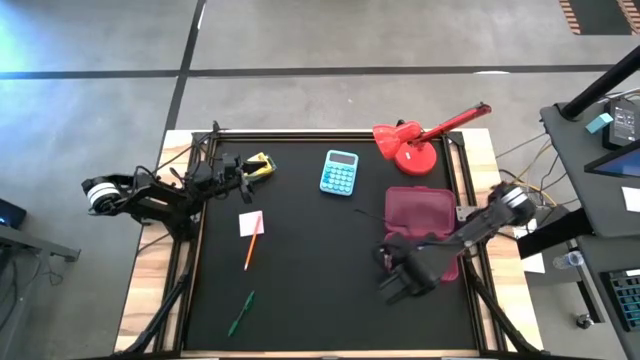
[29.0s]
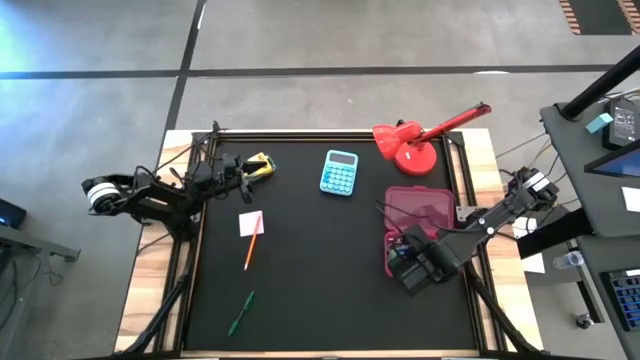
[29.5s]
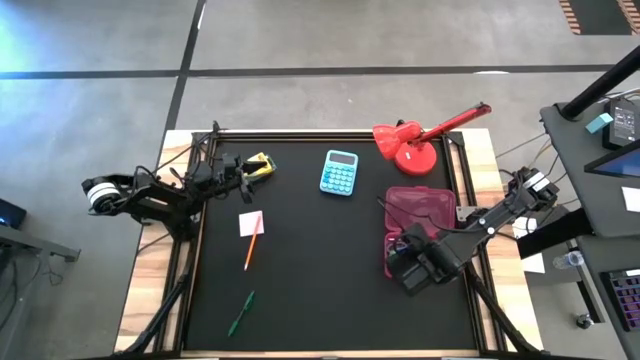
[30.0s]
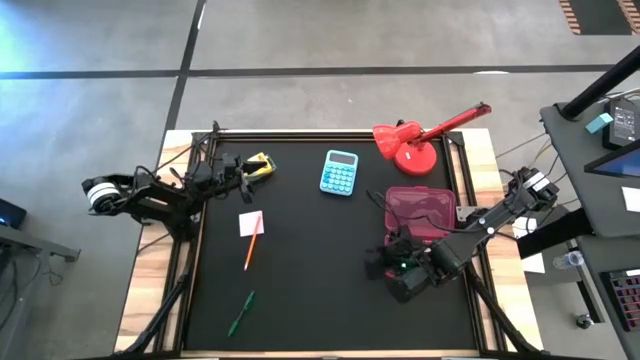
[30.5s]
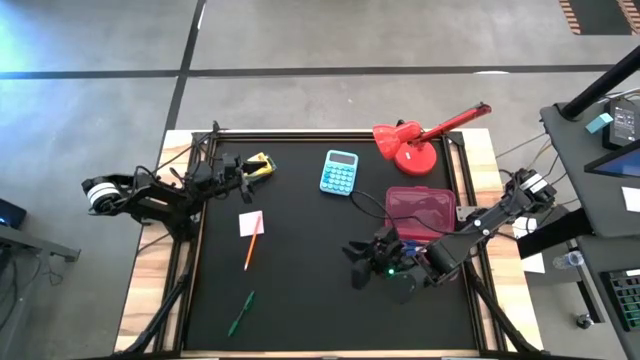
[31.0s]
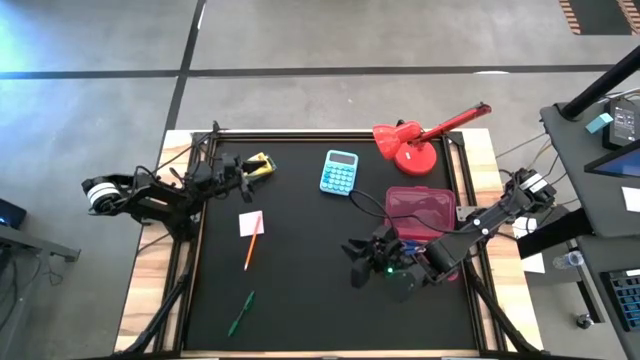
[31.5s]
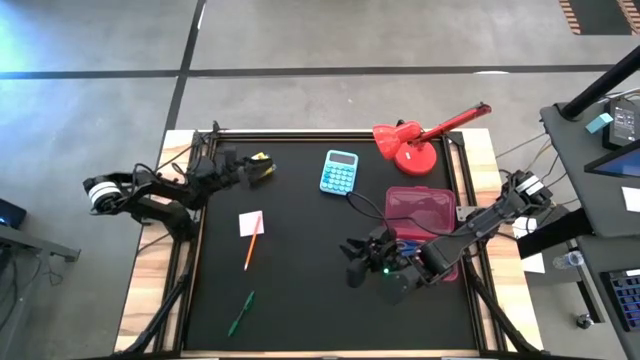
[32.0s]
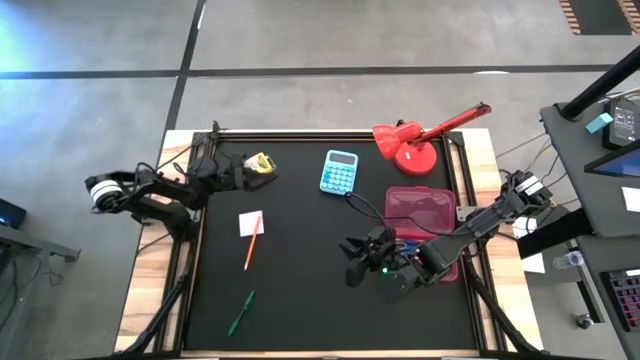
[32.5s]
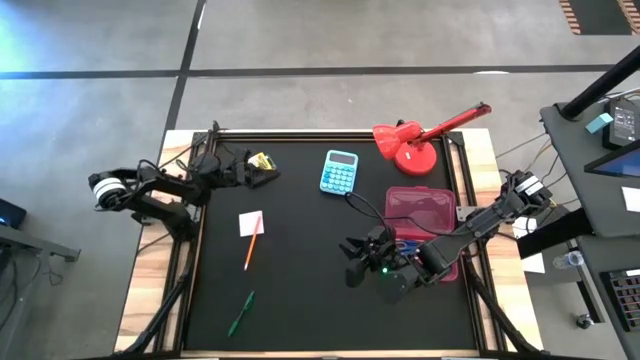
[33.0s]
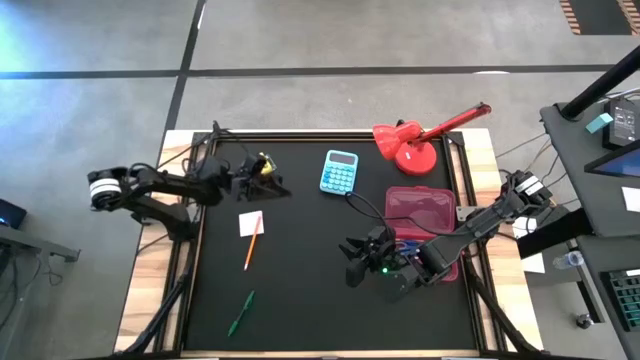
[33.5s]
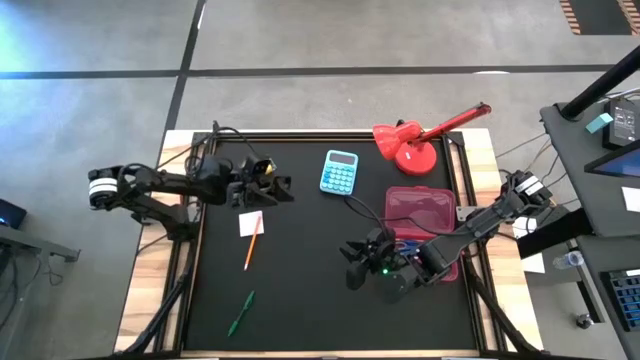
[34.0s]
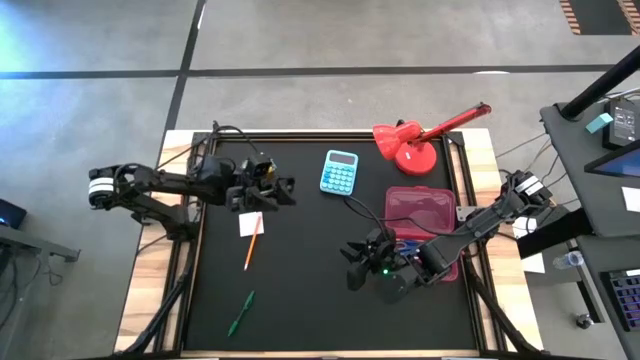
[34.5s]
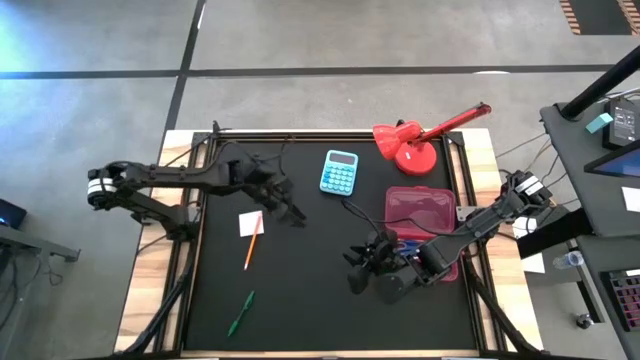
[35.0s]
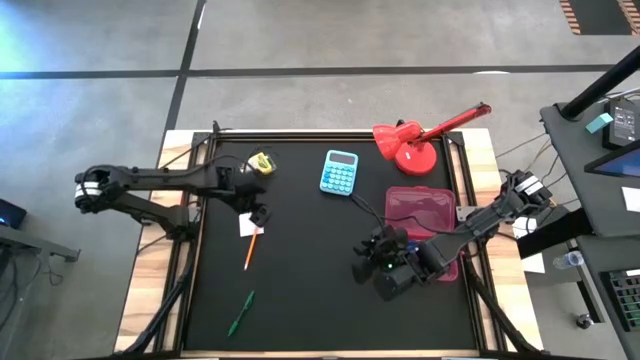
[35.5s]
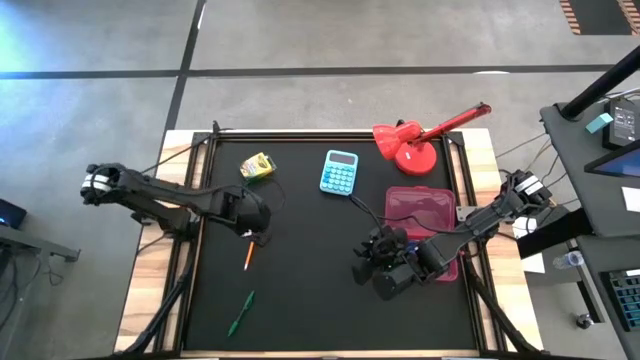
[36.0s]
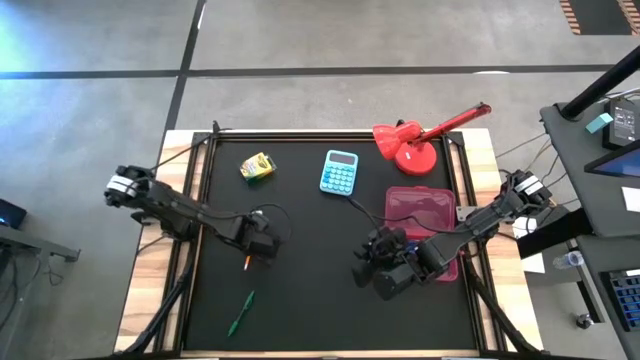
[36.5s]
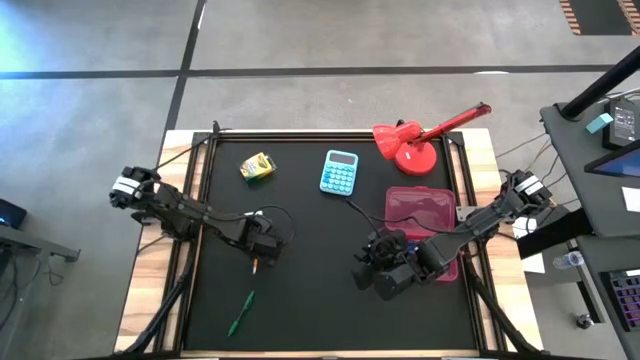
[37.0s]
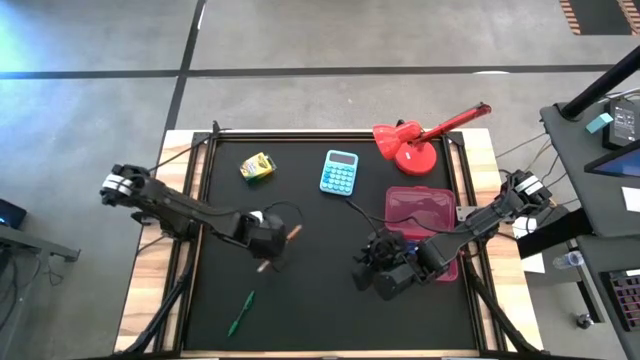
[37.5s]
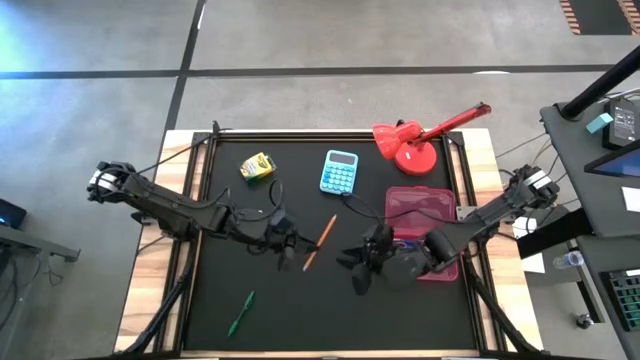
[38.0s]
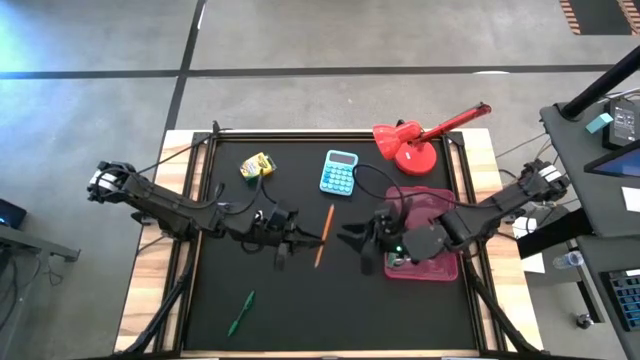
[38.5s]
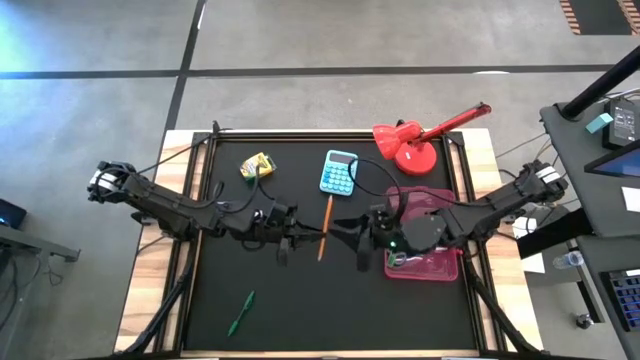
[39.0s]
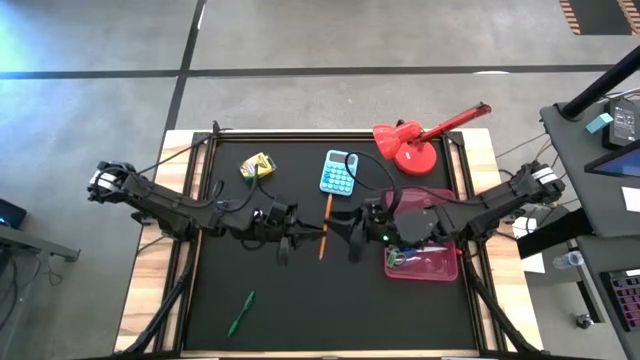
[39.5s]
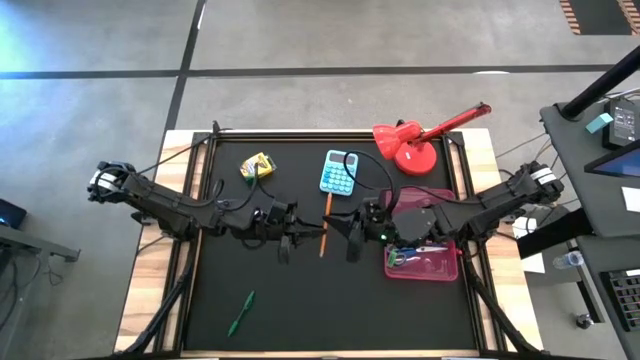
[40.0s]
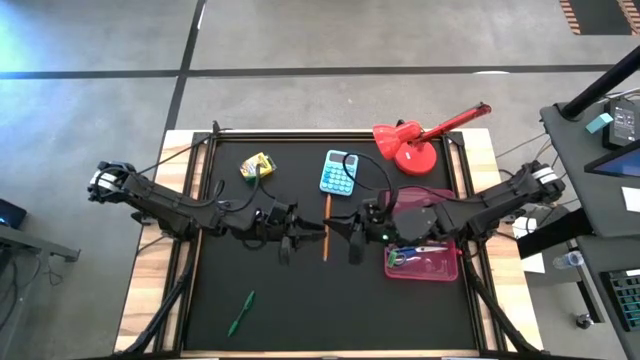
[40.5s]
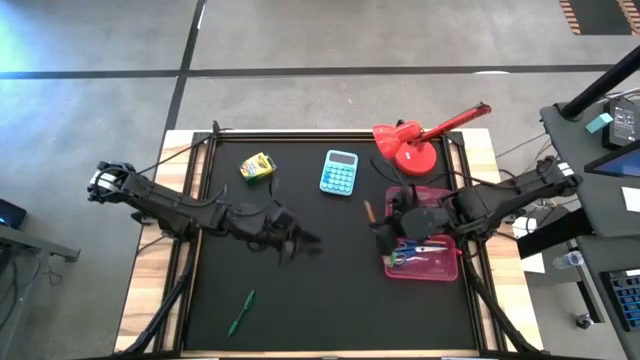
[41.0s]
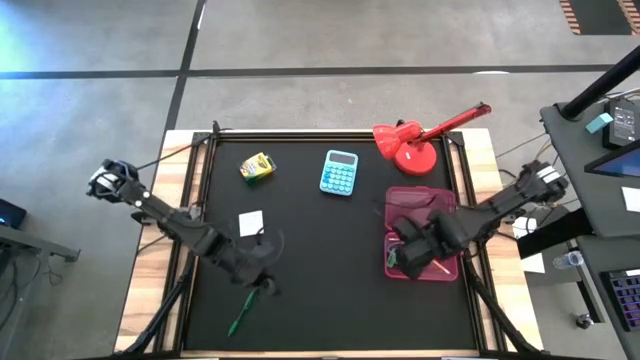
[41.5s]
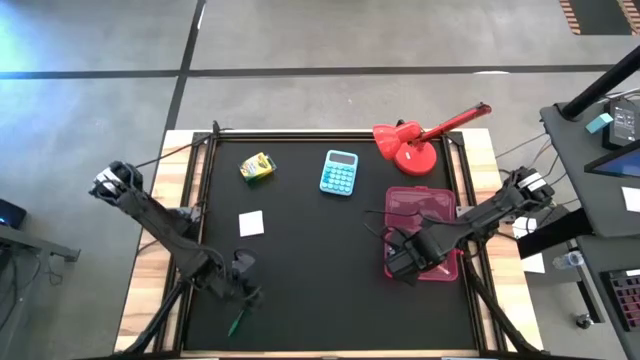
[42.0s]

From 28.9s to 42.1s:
Task: Pack school essentials
Put the orange pencil into the pink supply box

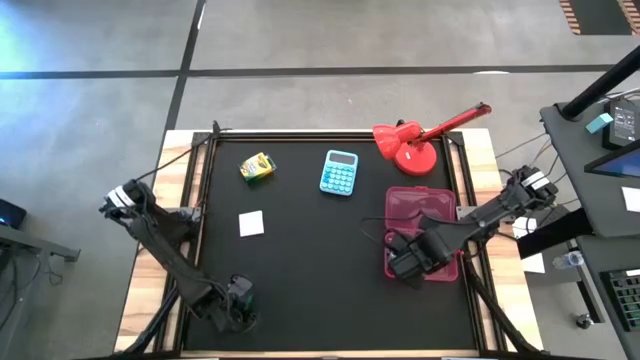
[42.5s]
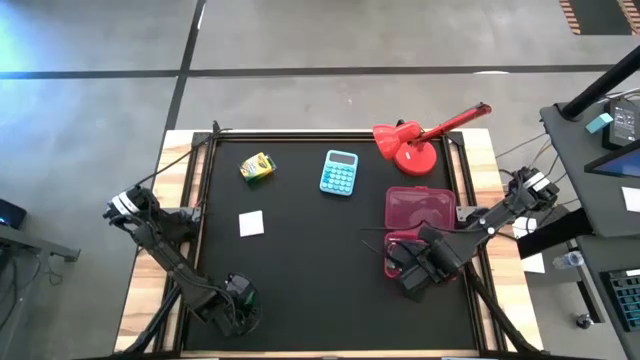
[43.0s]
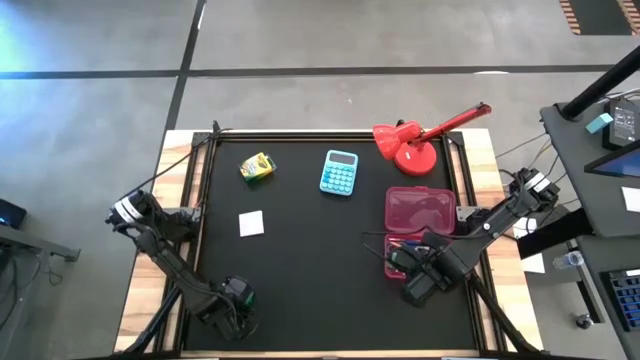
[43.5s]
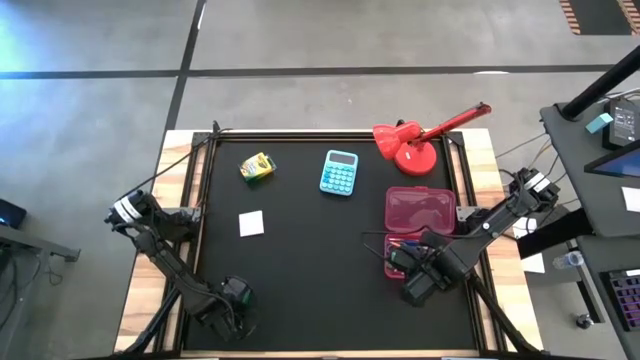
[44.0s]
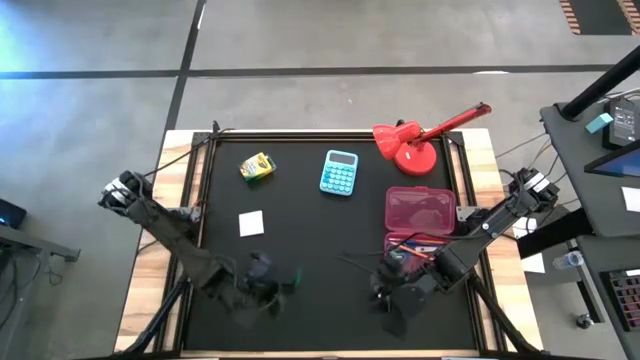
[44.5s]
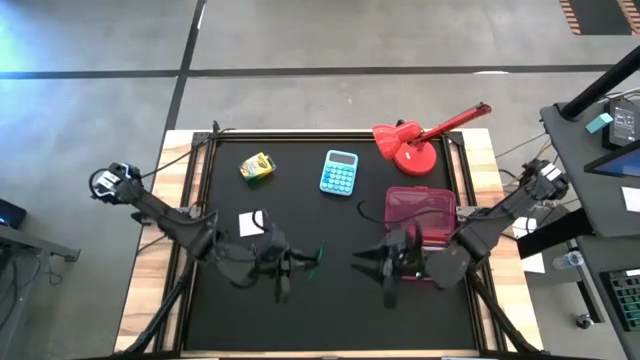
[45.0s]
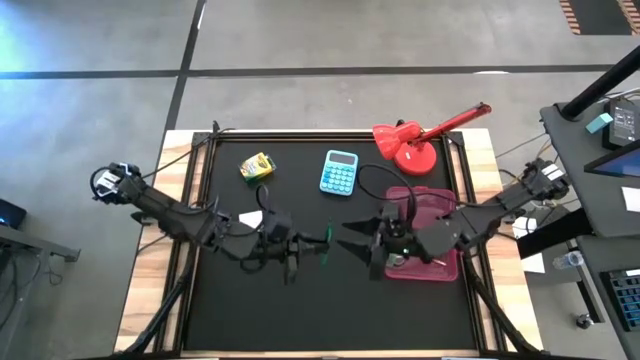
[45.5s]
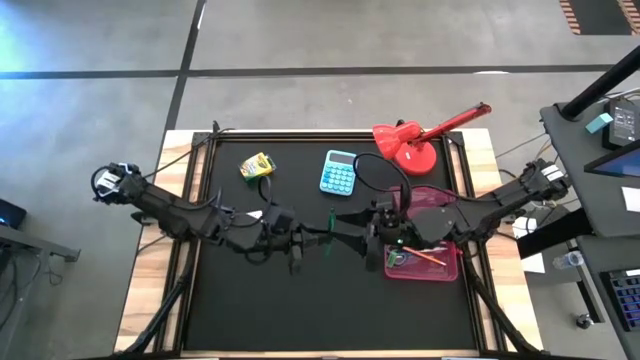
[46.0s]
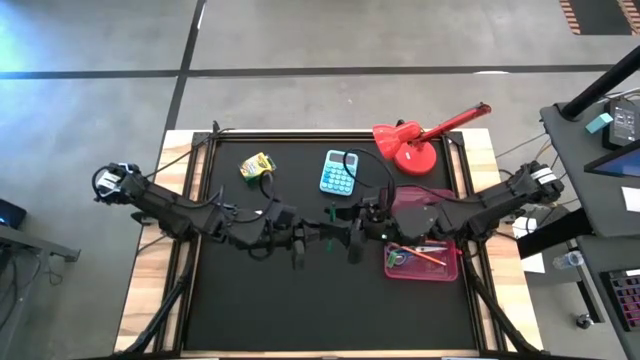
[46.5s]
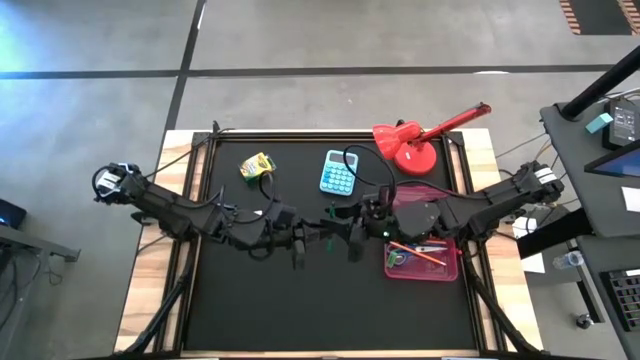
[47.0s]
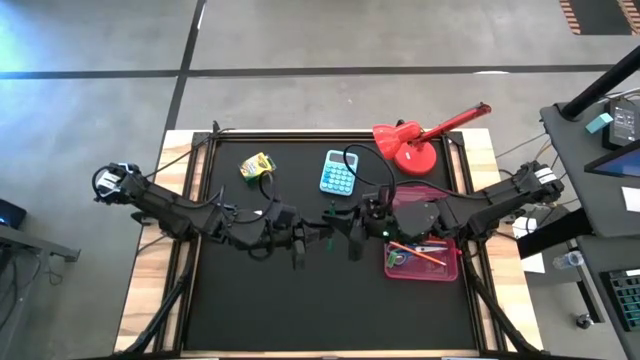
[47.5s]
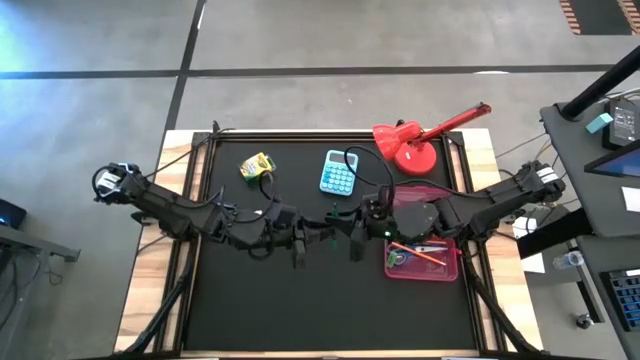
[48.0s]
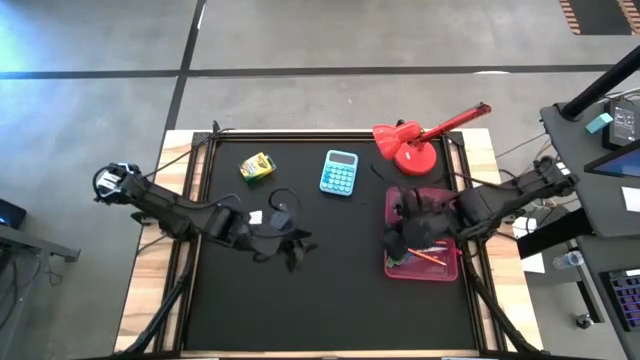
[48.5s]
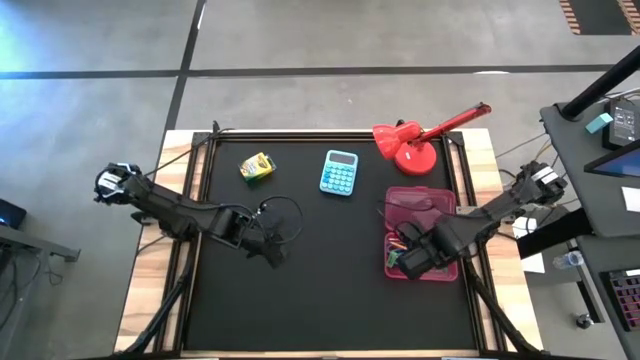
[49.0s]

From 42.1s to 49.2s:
Put the green pen into the pink supply box
